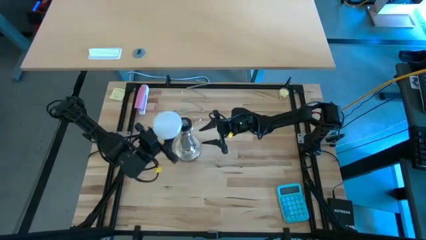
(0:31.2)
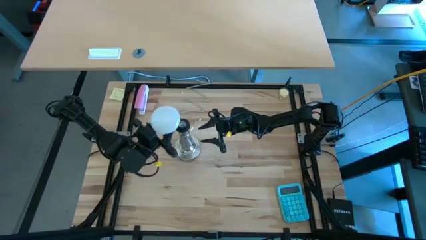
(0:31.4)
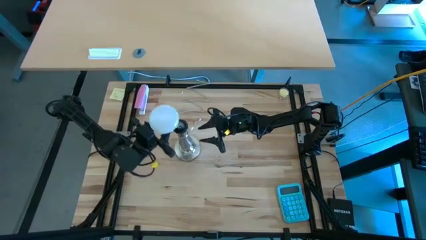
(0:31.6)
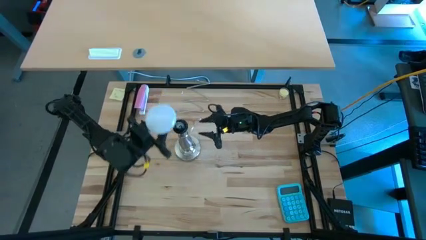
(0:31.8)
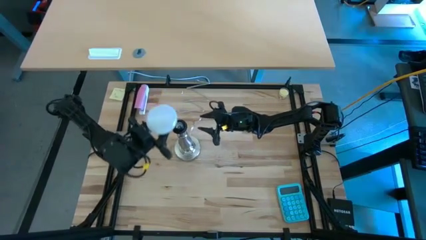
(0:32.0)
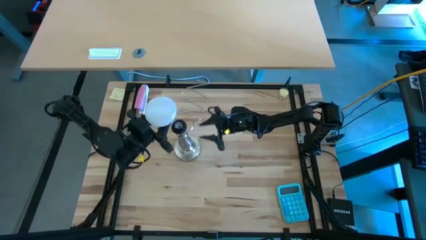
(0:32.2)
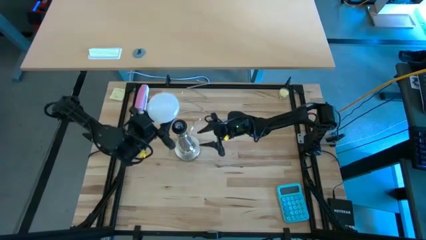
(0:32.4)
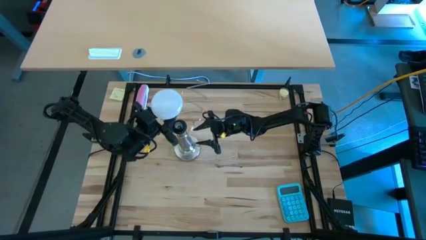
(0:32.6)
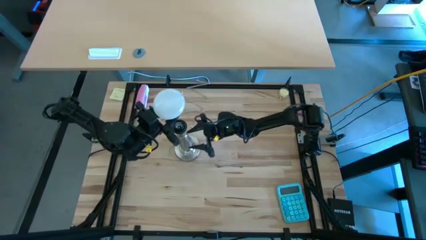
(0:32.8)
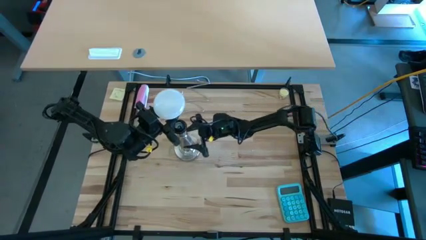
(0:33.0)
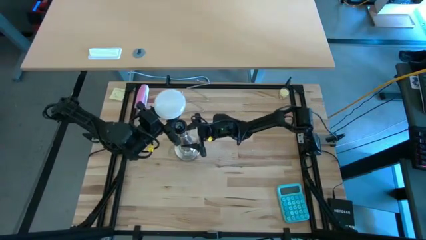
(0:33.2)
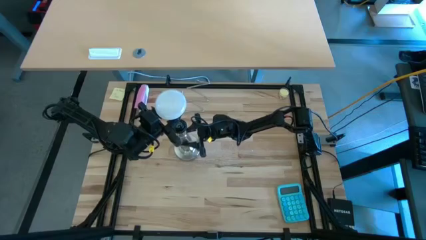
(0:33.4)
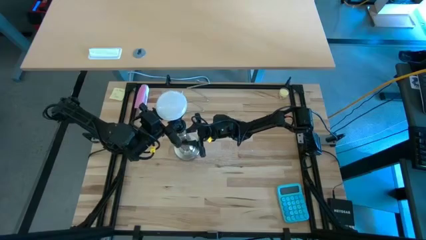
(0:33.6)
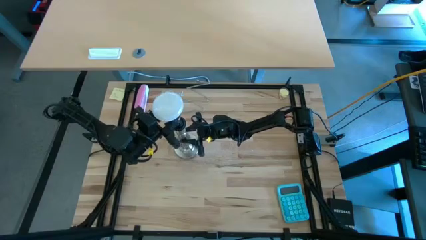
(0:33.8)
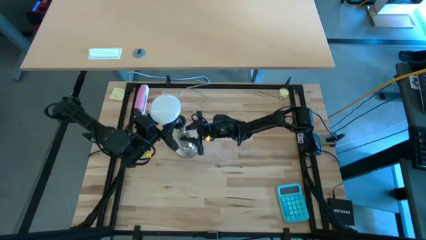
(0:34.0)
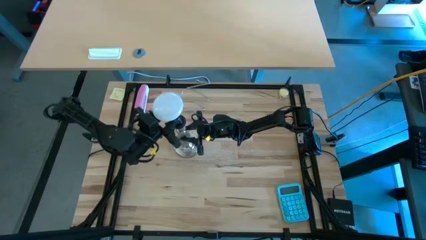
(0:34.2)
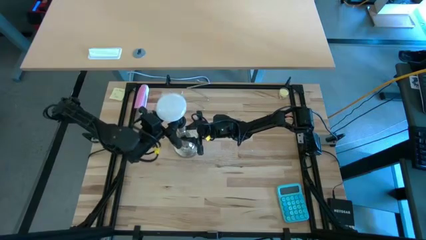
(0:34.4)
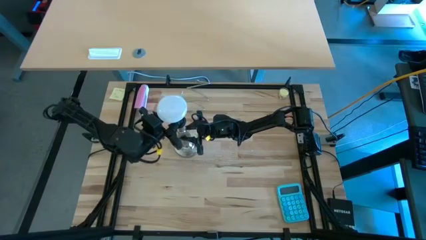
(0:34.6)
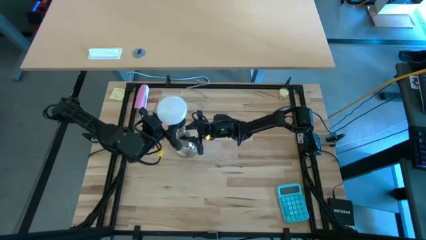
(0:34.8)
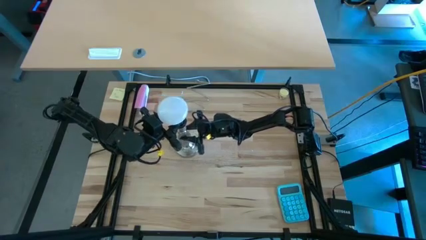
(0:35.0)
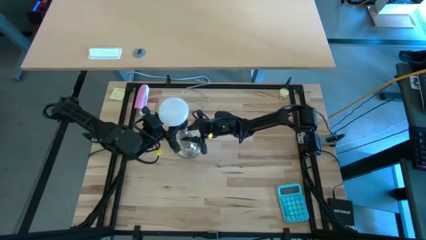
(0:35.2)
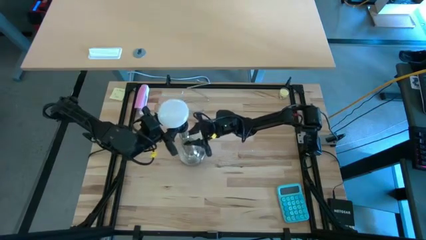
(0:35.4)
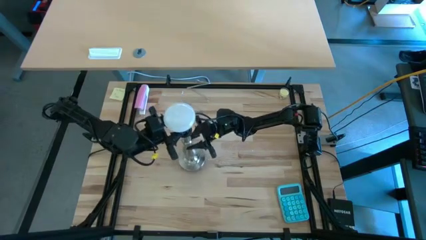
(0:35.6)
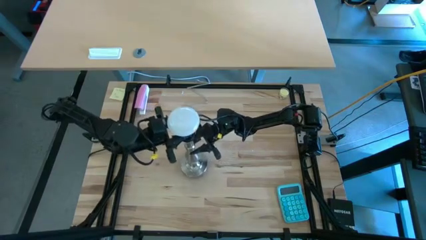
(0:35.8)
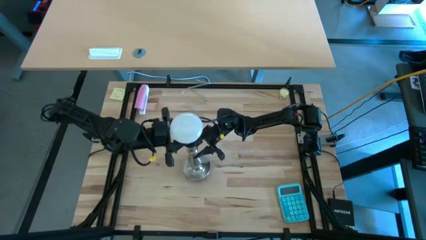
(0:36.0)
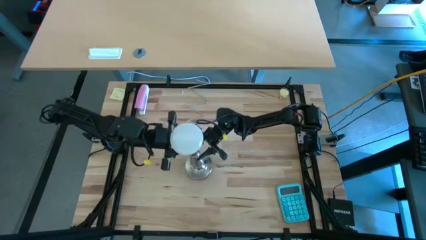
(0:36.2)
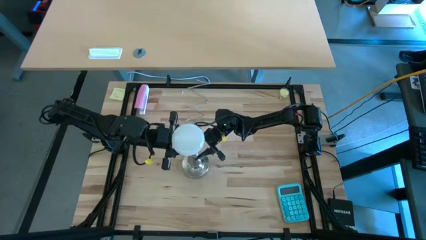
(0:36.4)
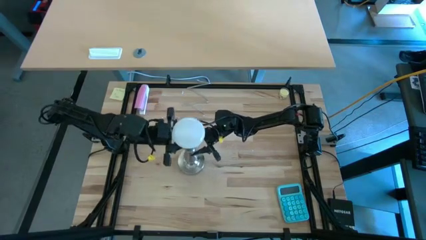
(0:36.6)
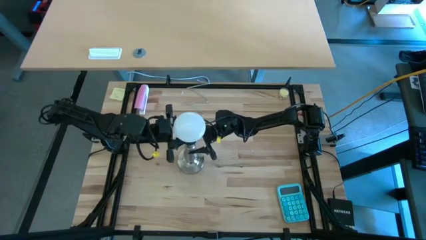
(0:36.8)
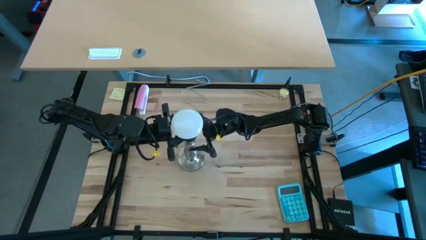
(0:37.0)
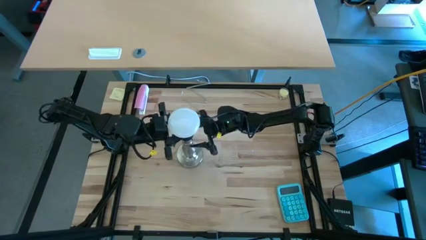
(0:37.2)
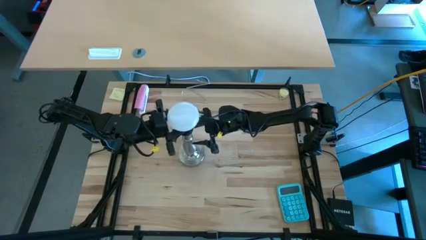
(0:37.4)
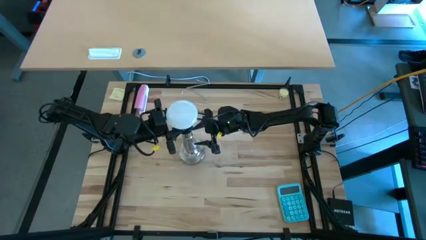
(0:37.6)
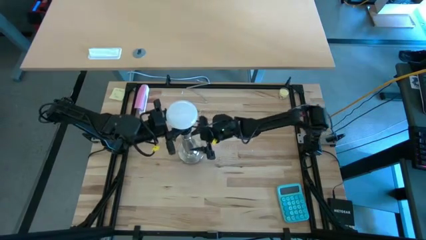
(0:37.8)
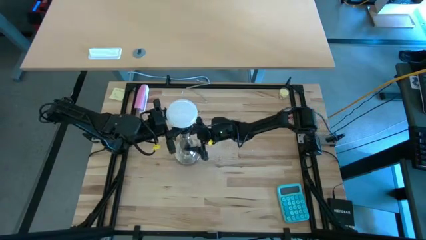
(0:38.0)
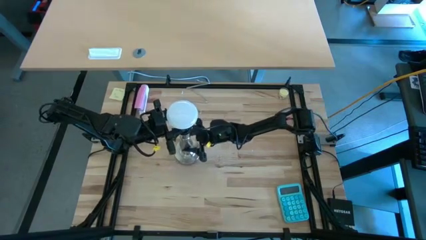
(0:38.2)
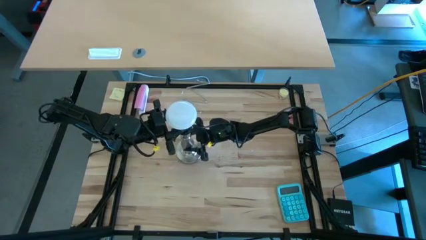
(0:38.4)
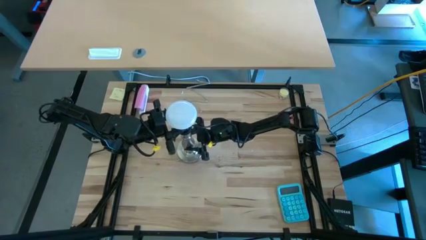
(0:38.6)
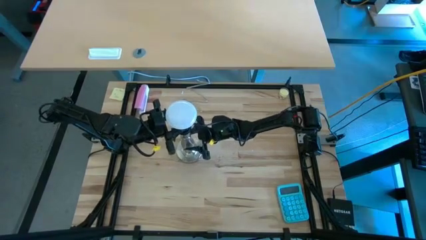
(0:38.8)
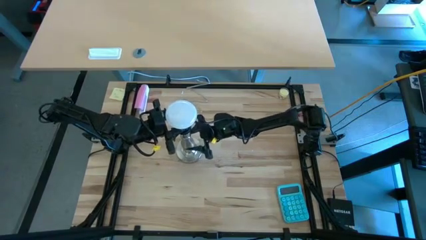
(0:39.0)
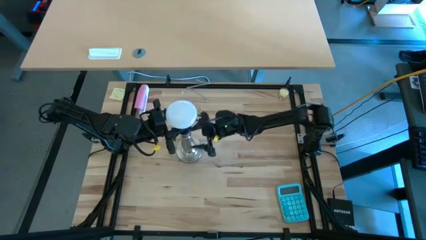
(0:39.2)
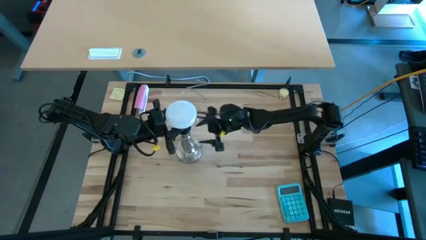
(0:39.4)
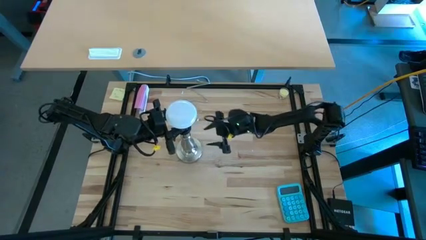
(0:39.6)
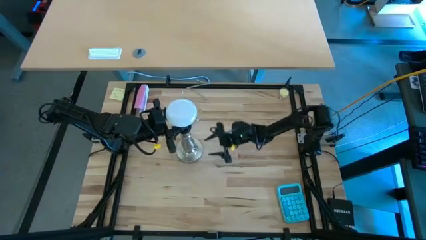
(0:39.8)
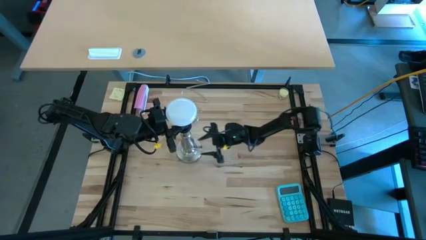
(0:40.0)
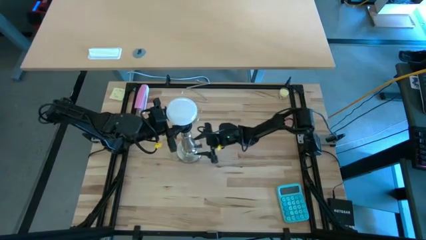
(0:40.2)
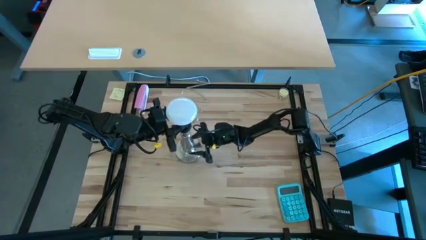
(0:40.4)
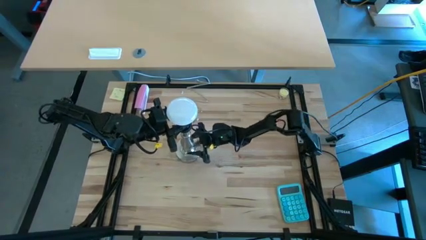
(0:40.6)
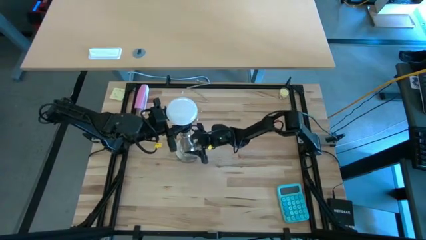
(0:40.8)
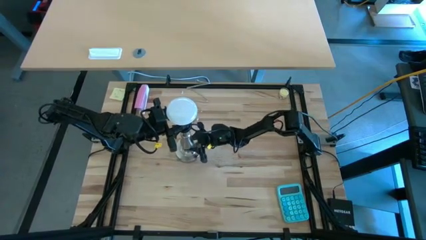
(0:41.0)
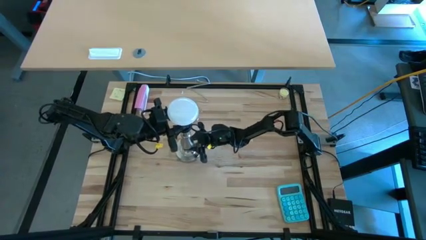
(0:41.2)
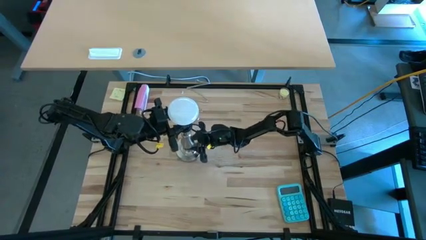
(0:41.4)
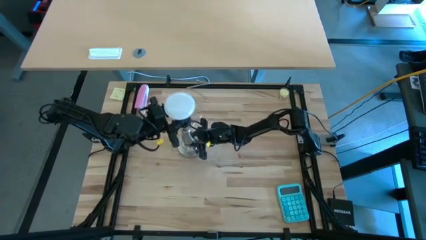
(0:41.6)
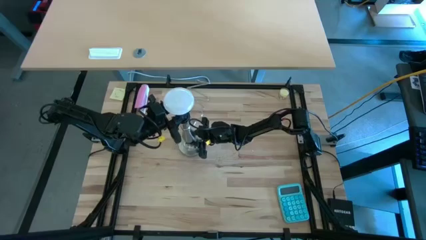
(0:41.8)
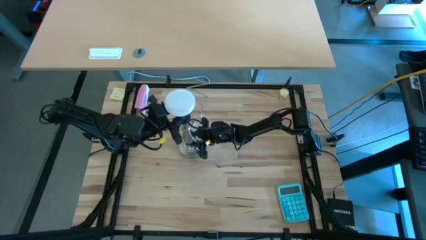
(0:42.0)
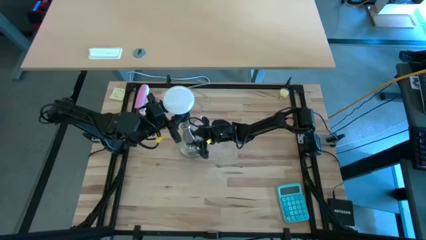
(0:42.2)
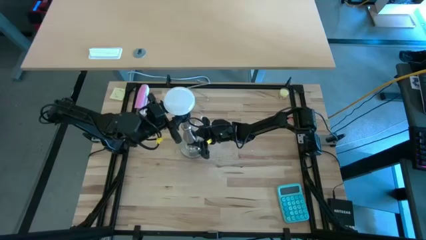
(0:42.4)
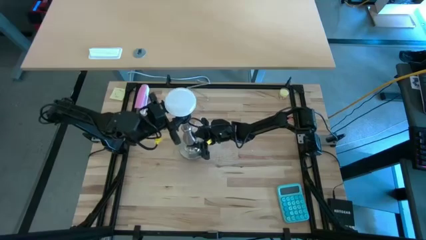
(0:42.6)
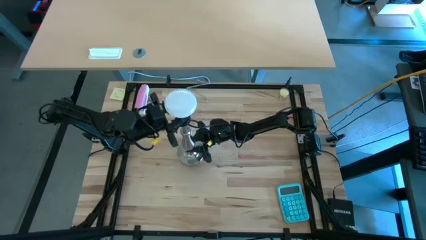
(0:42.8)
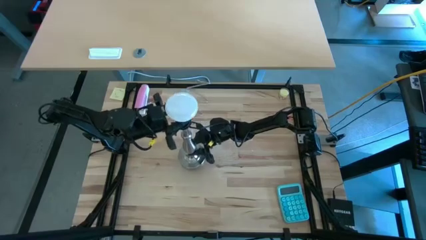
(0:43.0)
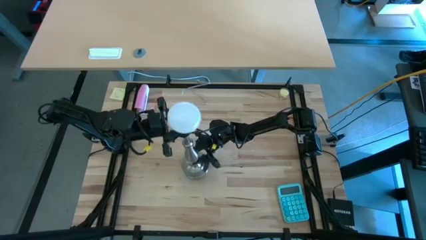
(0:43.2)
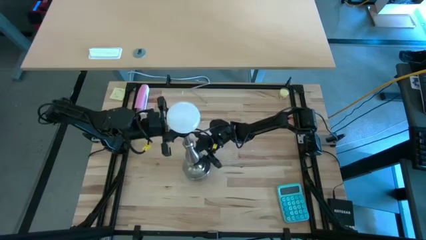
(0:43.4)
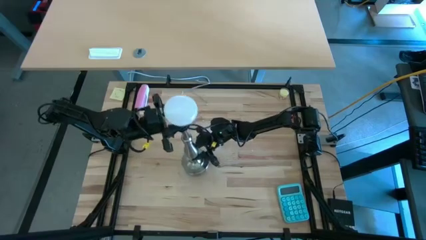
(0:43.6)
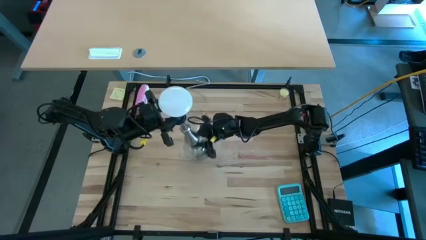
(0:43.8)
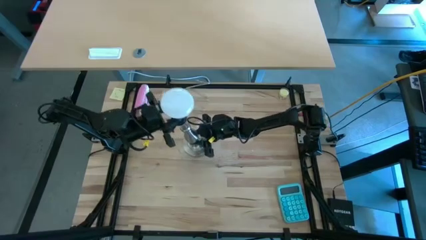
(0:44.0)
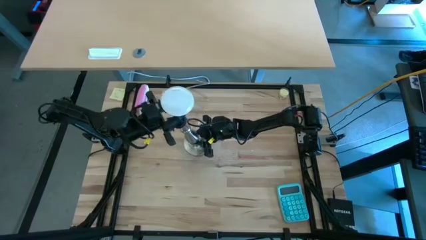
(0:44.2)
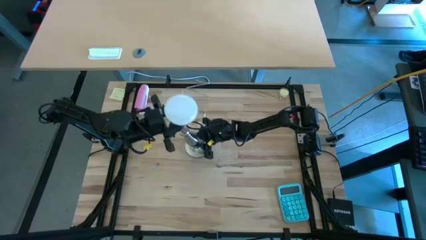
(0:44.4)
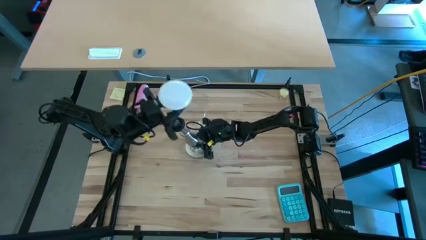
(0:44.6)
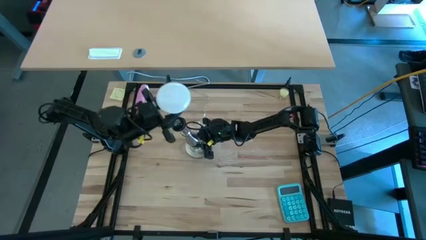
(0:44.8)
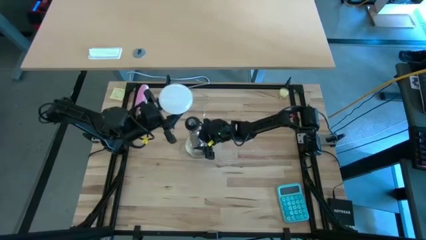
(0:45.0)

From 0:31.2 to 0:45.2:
Task: Screw lightbulb
Insert the lightbulb into the desk lamp
